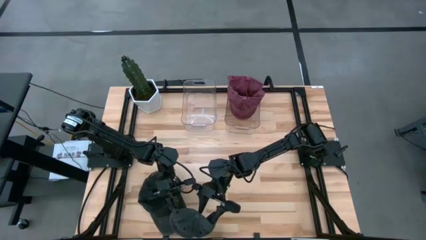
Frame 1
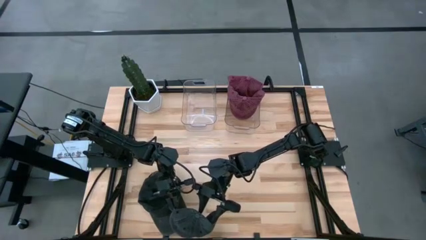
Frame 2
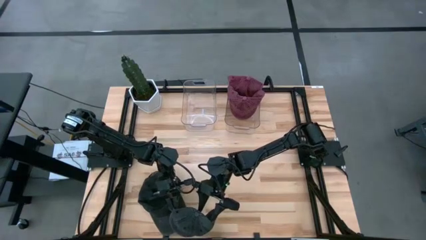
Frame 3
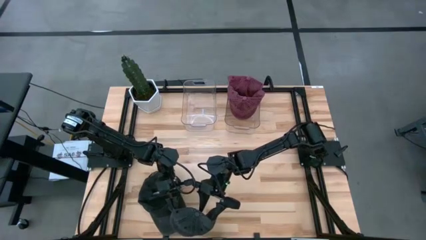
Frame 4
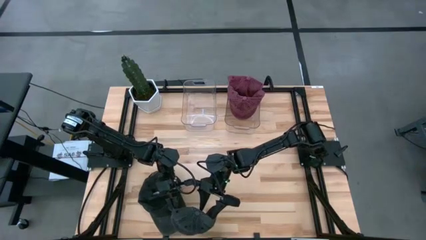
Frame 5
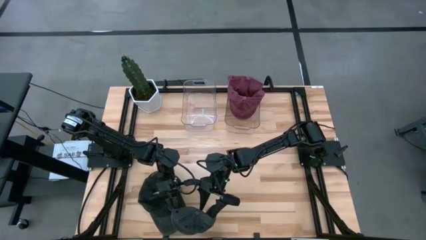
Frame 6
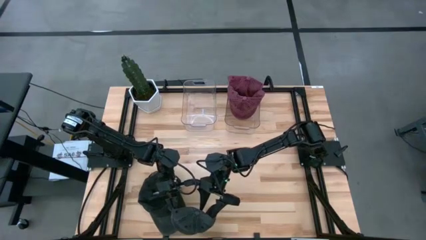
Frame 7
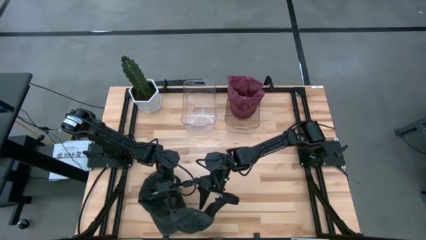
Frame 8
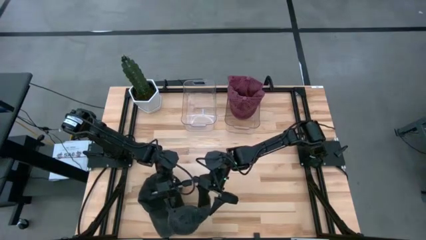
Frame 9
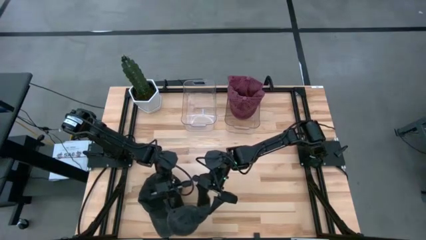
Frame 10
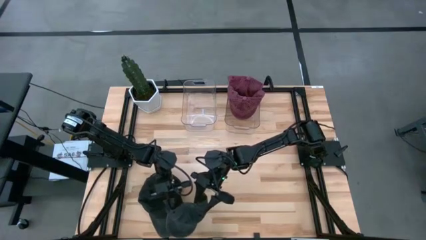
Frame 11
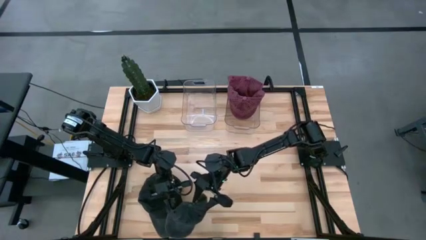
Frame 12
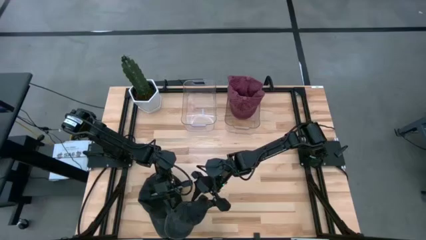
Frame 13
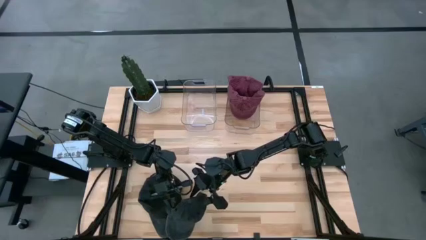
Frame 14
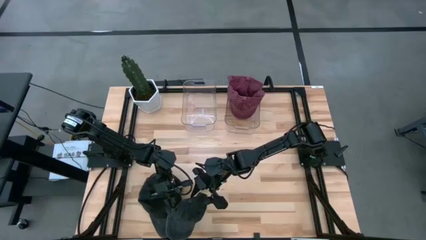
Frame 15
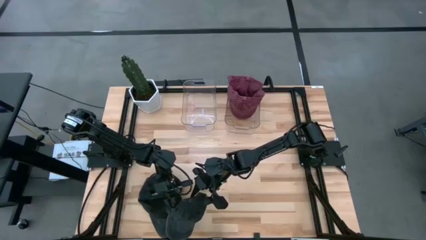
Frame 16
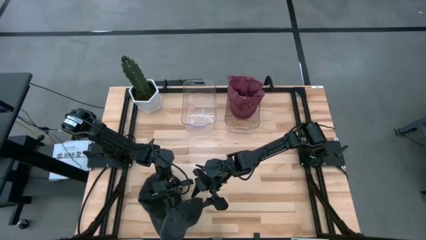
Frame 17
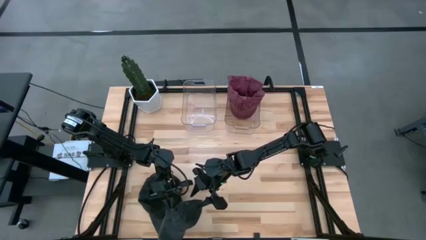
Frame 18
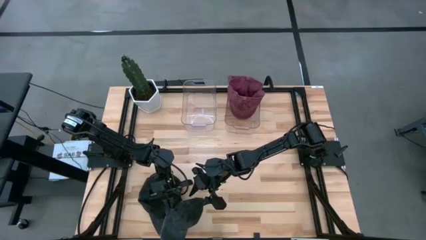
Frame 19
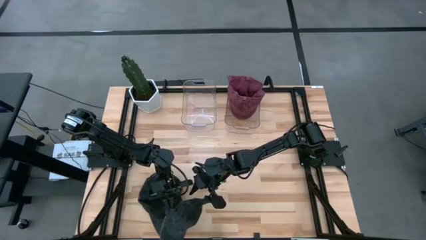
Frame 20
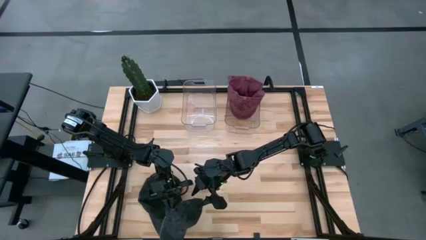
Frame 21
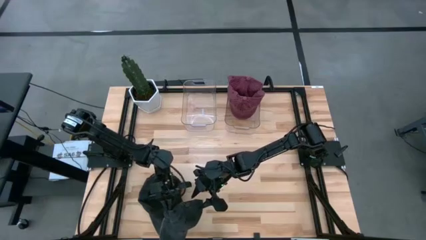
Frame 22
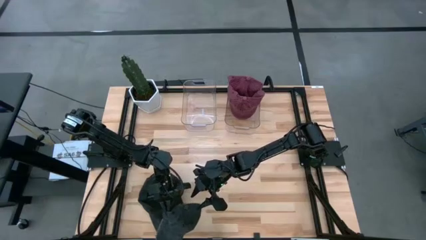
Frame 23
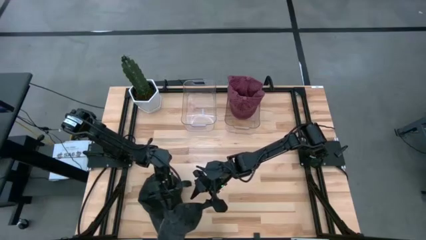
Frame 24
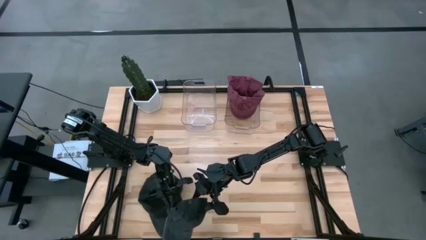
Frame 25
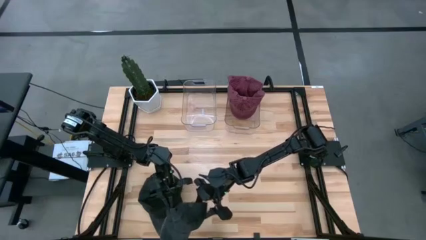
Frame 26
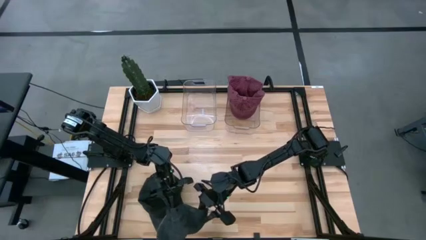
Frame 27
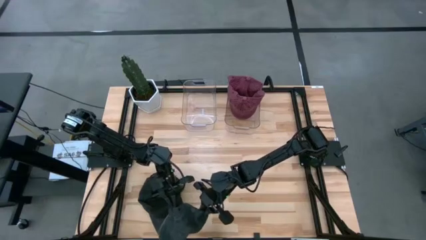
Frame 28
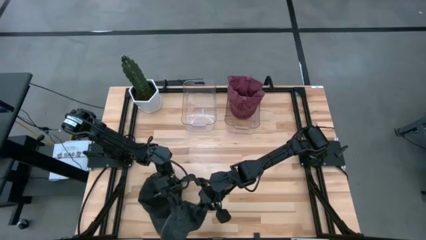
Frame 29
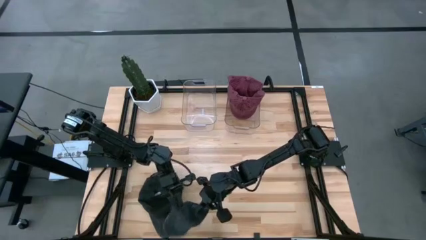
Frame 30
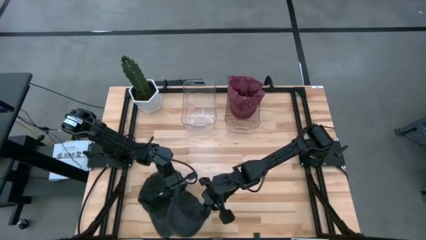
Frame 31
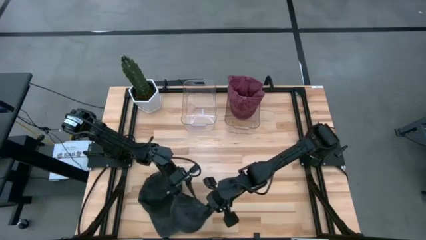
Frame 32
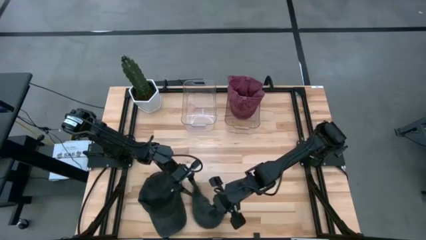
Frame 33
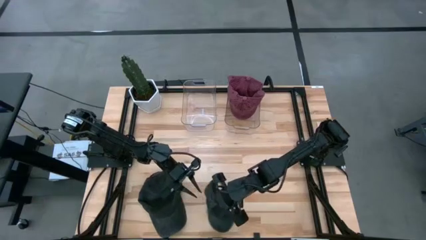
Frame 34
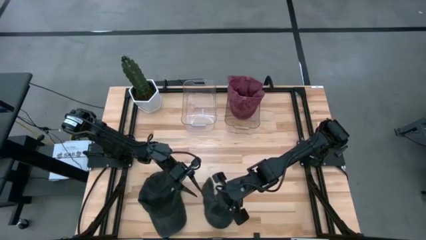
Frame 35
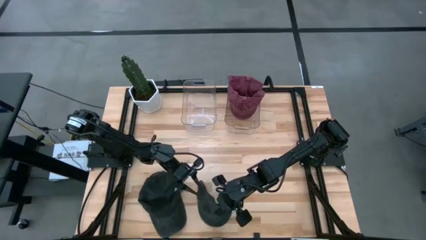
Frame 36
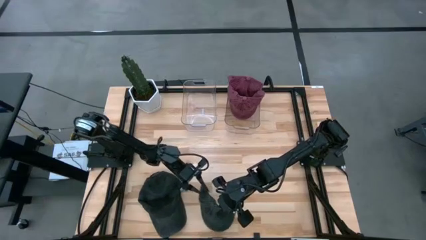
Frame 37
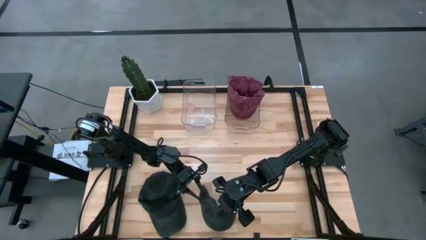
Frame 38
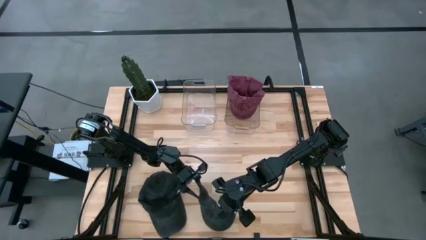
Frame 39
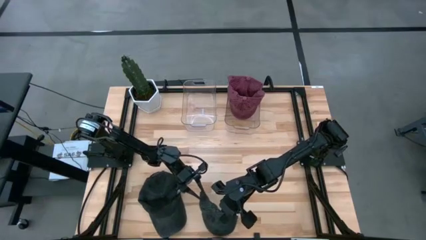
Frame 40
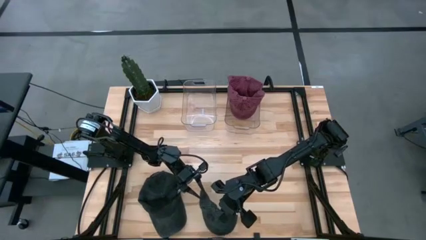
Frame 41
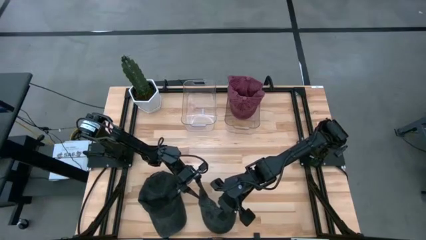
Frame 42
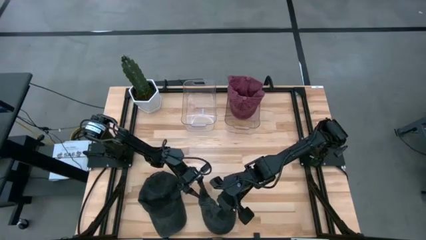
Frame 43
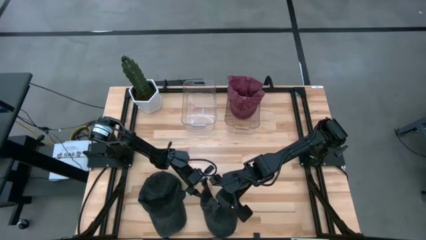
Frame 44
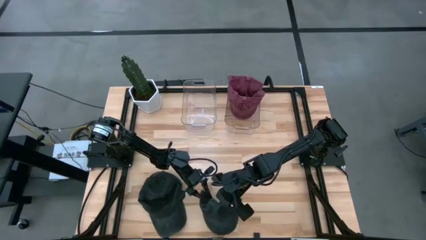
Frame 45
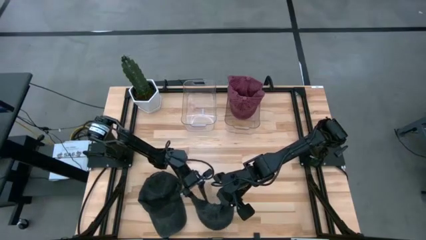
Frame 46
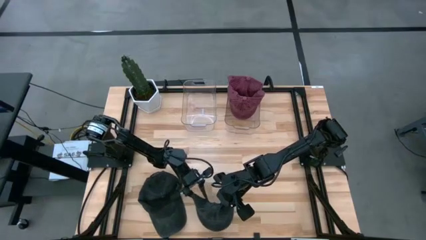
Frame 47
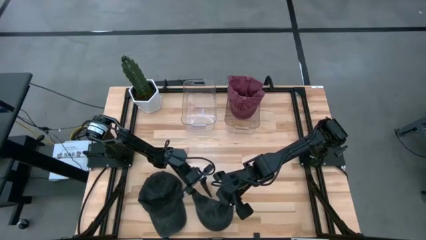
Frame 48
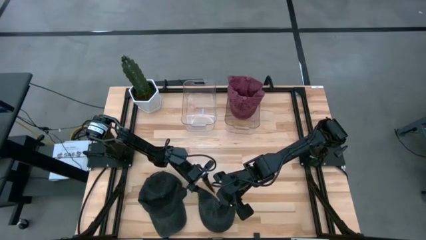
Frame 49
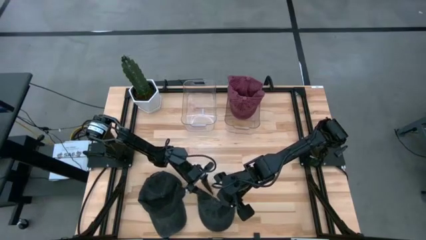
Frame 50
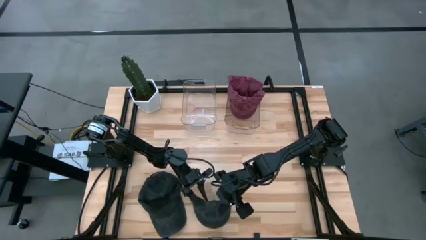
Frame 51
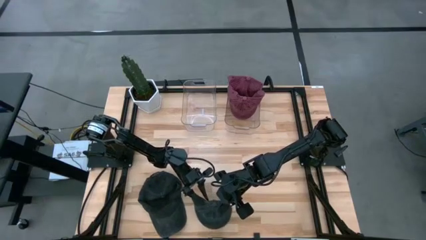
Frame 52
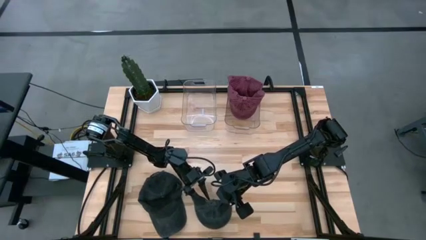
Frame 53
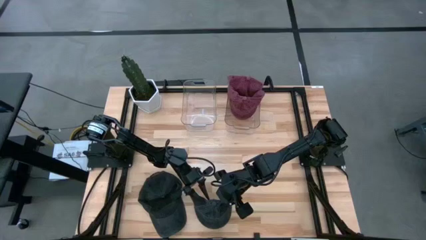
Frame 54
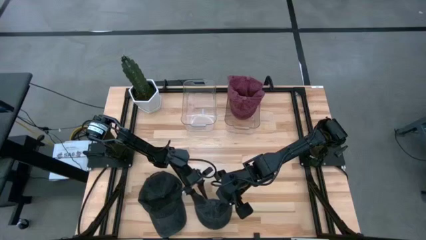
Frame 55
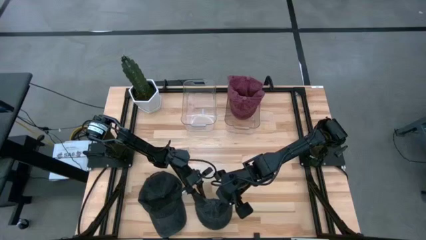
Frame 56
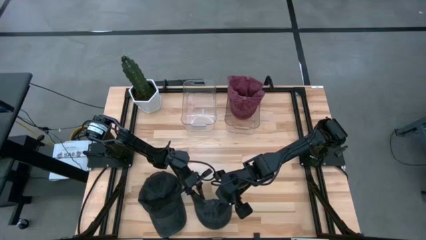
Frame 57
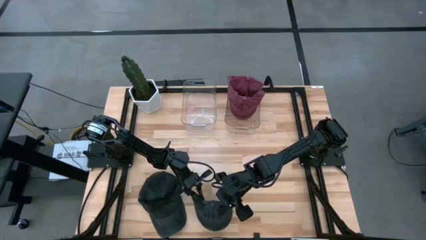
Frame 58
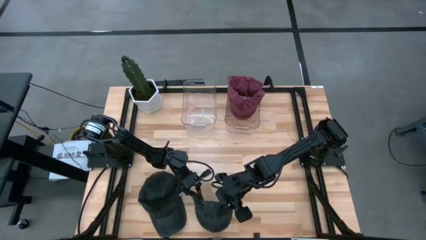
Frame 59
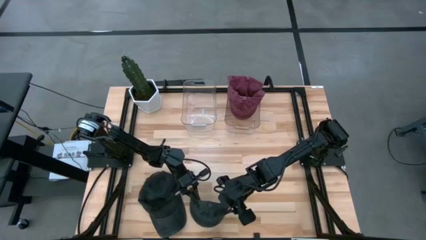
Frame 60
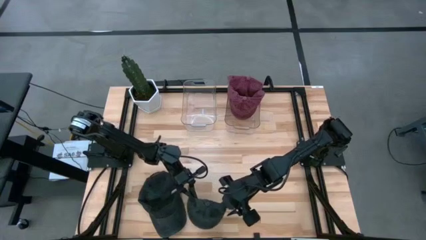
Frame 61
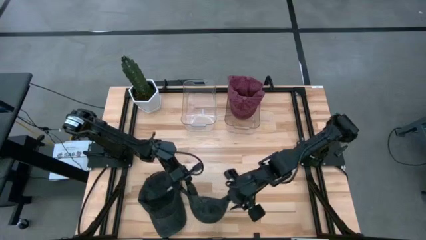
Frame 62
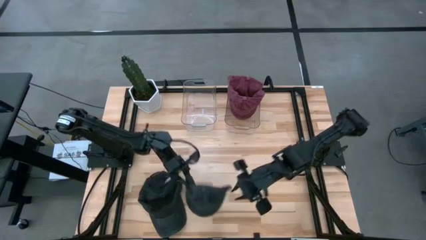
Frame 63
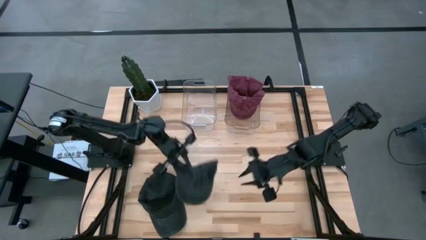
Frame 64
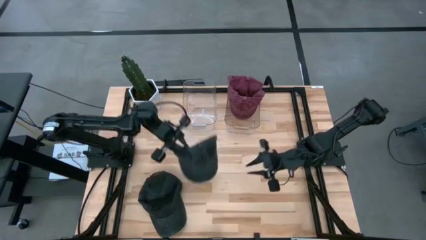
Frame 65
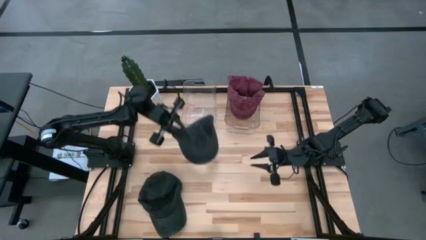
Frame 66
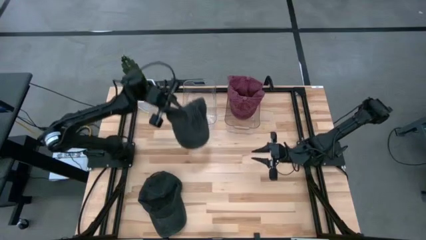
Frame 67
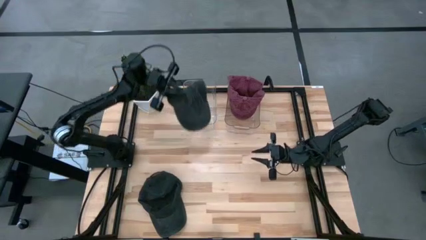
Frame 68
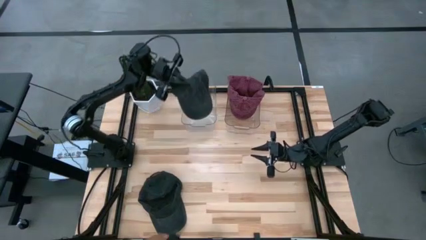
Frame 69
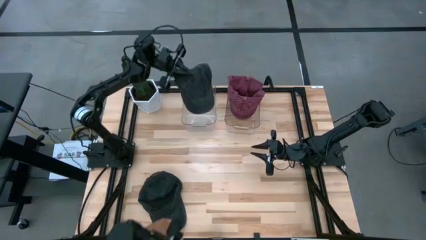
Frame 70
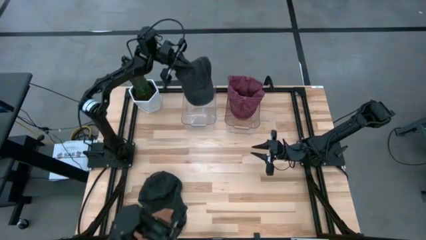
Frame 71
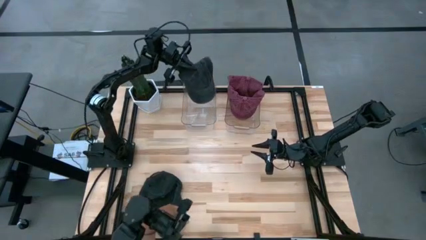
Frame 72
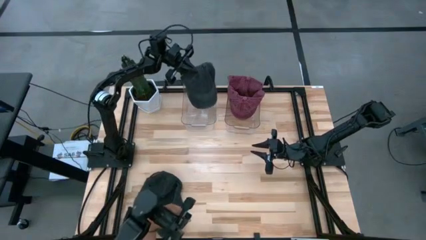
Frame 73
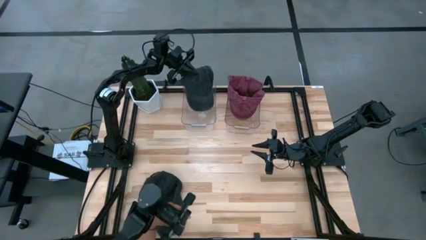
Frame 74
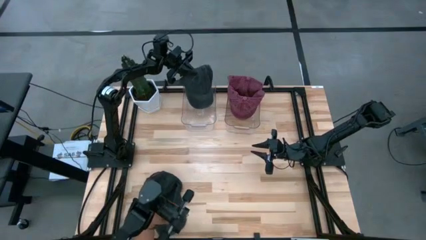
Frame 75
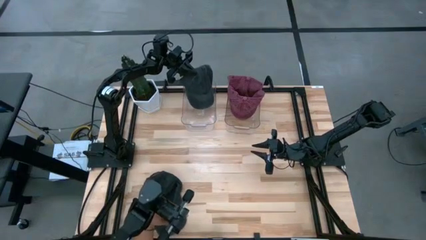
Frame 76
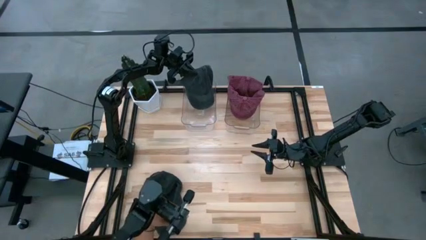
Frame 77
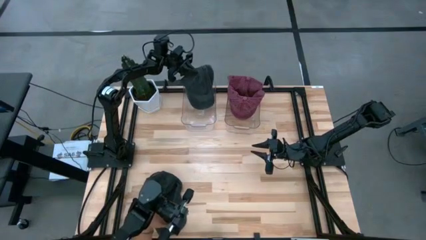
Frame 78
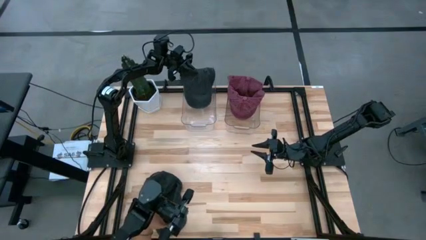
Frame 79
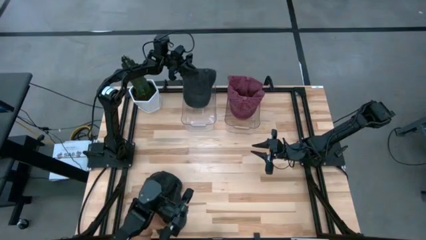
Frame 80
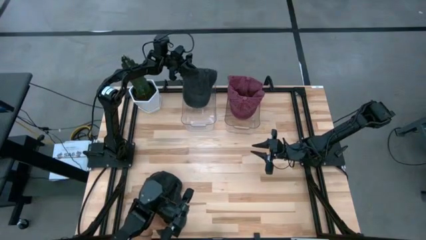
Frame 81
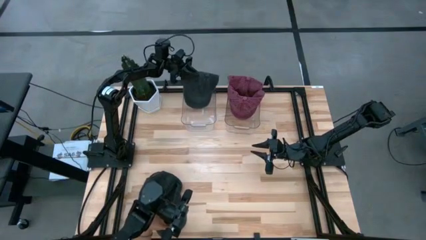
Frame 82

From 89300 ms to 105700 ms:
Task: Pick & Place hat
Put the right black head cap into the left transparent bin
